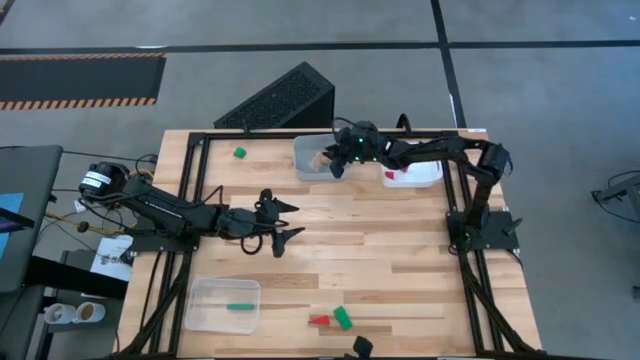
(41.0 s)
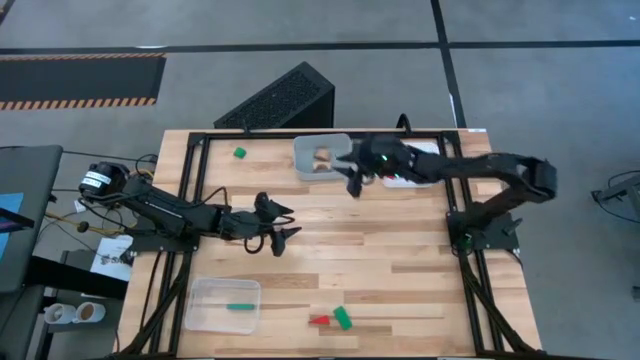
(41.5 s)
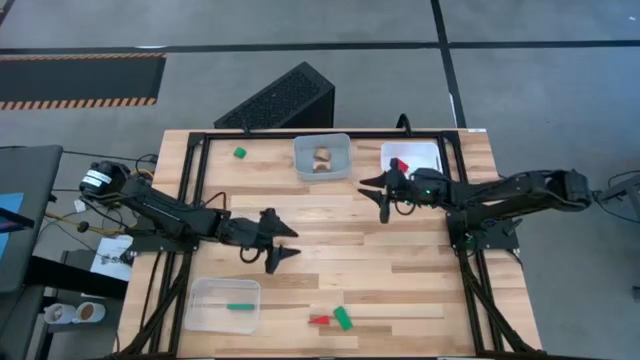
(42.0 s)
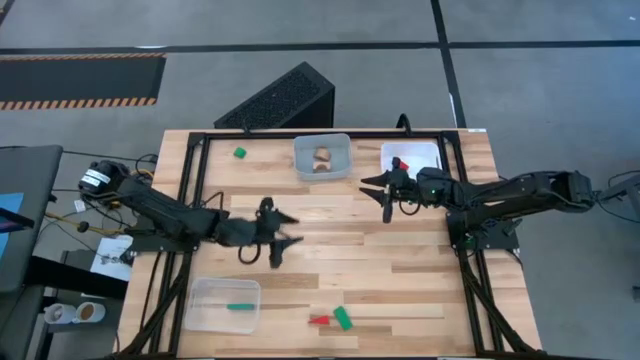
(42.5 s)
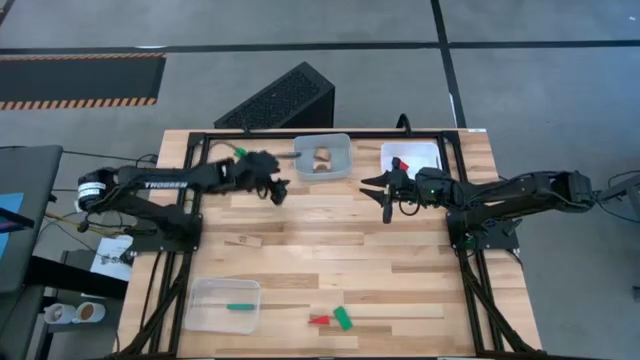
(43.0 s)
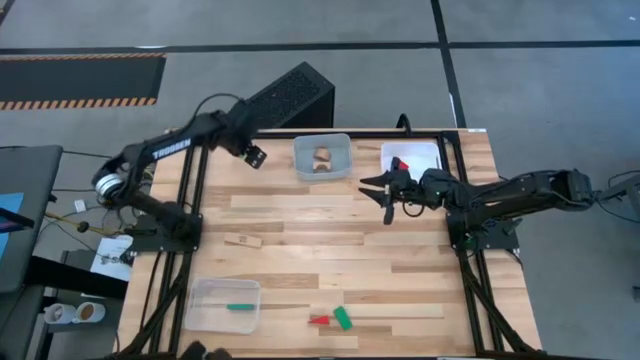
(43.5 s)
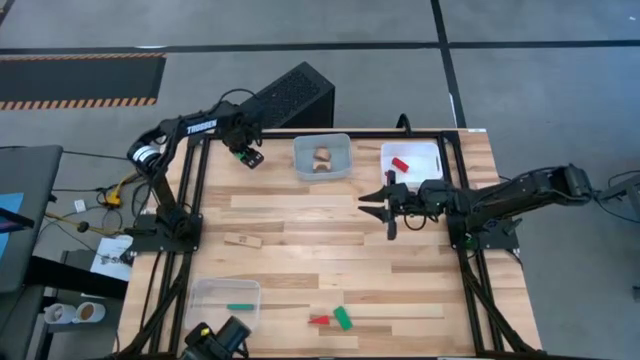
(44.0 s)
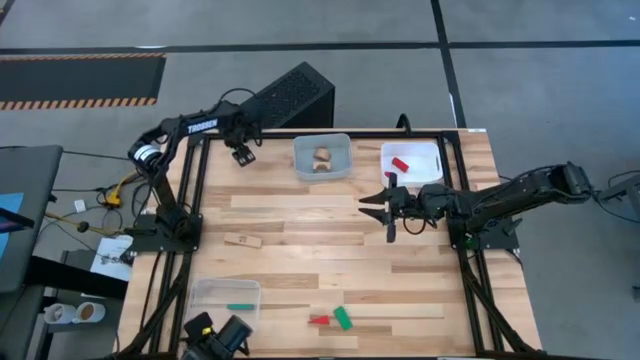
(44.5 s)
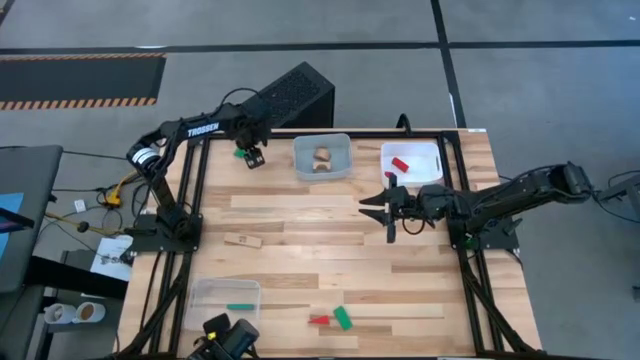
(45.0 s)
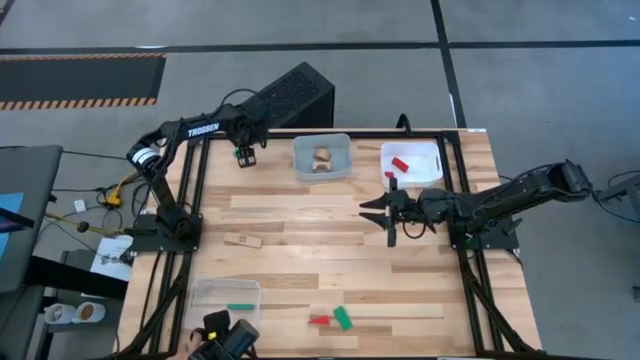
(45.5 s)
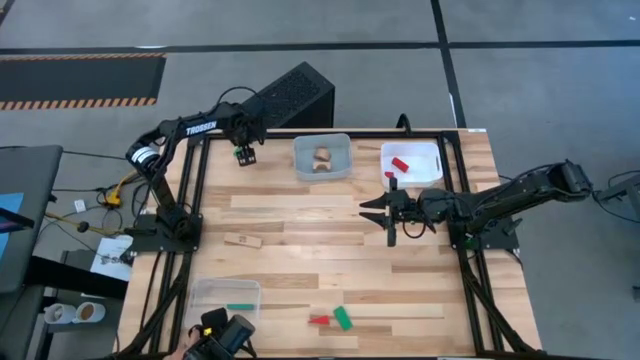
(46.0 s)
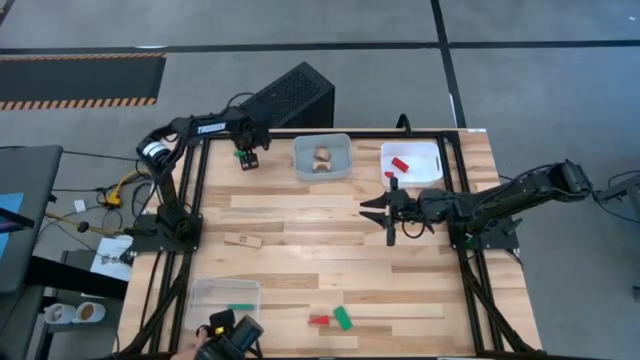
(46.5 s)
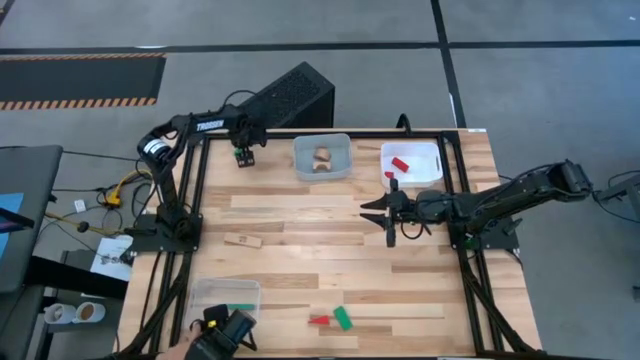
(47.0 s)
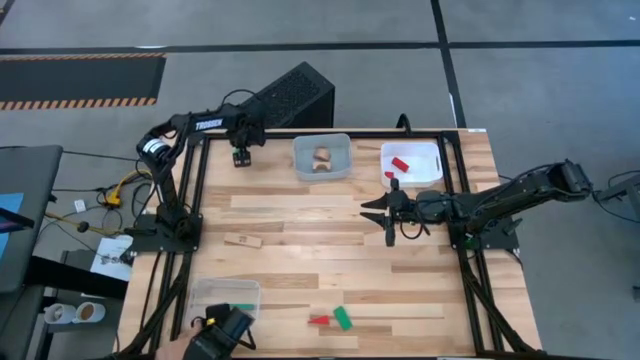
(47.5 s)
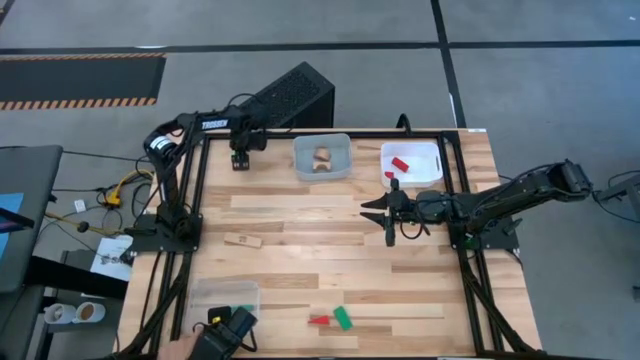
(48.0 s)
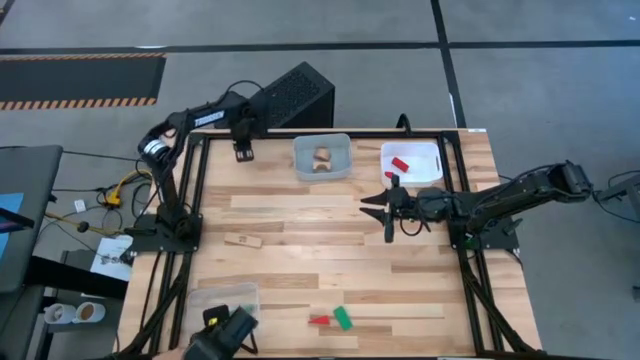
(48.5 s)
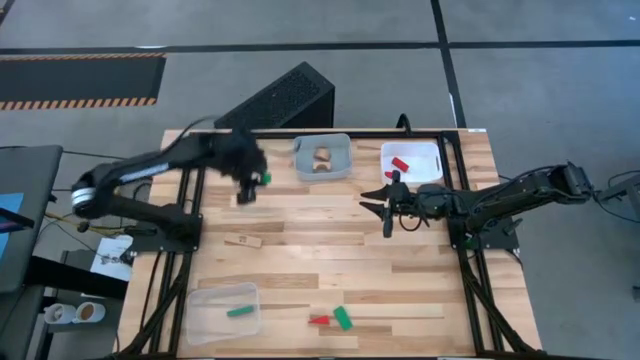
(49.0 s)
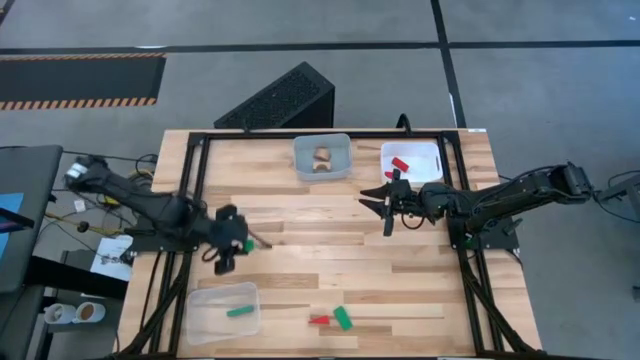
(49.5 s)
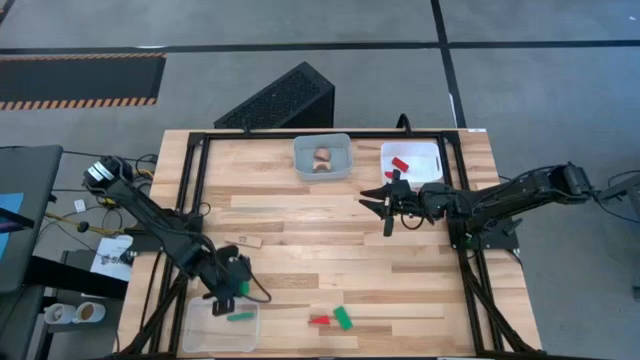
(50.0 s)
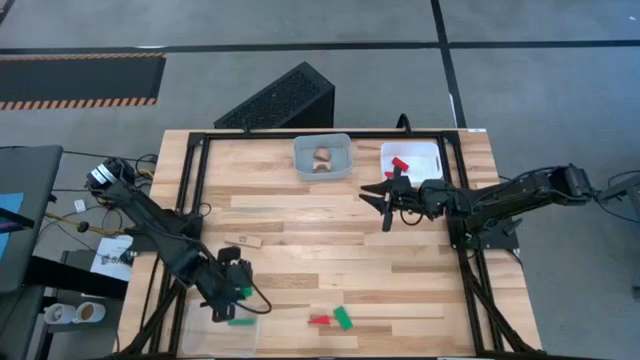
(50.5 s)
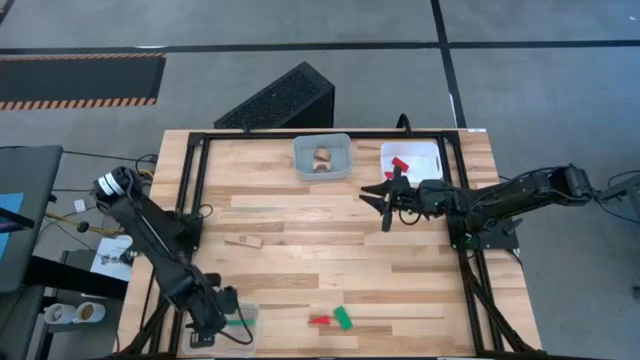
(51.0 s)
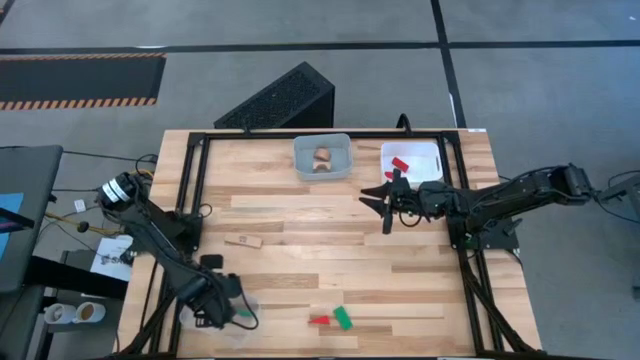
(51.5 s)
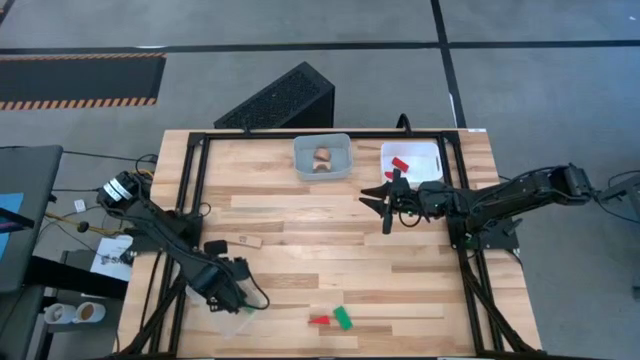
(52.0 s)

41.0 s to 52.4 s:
Task: Sort & place blocks by color
Put the top green block into the transparent bin

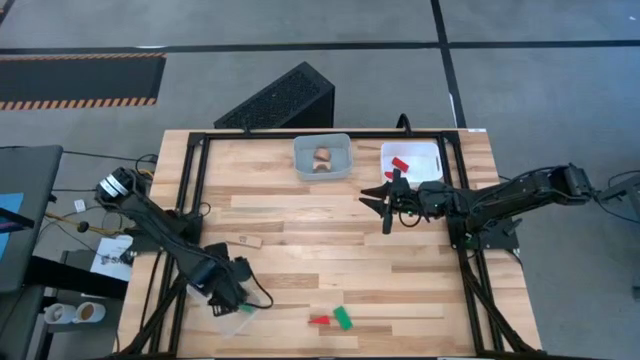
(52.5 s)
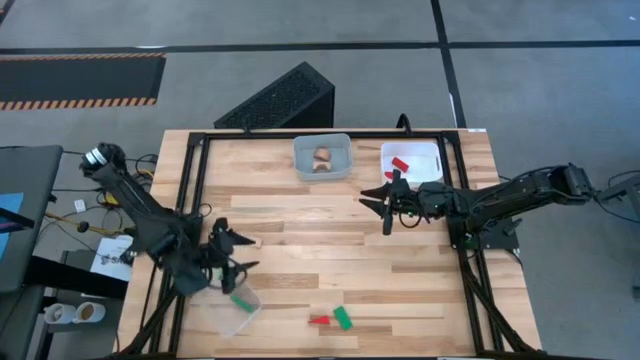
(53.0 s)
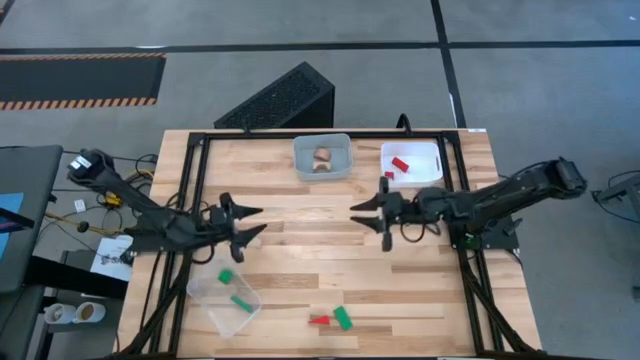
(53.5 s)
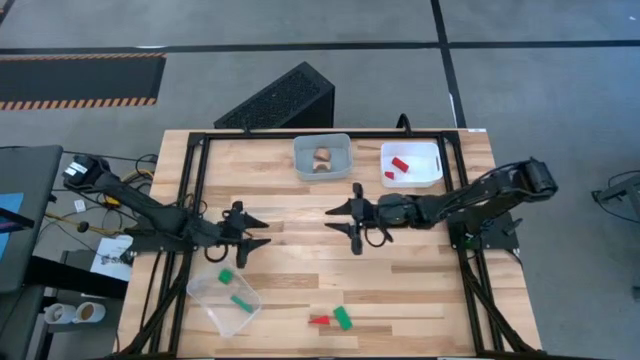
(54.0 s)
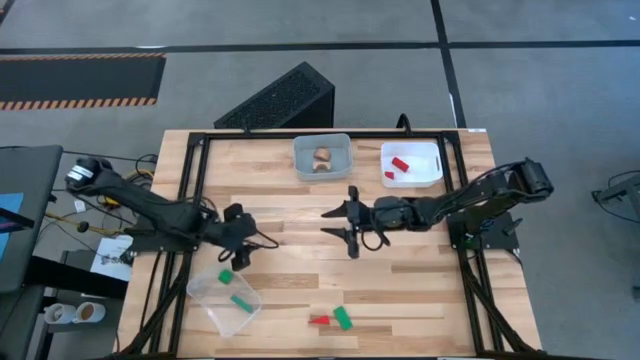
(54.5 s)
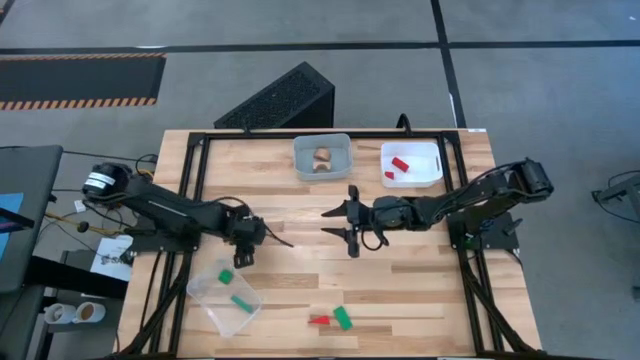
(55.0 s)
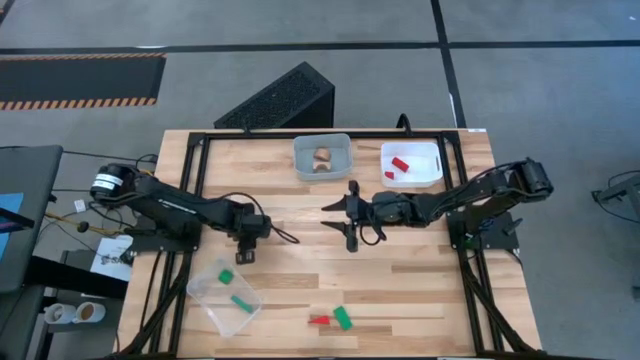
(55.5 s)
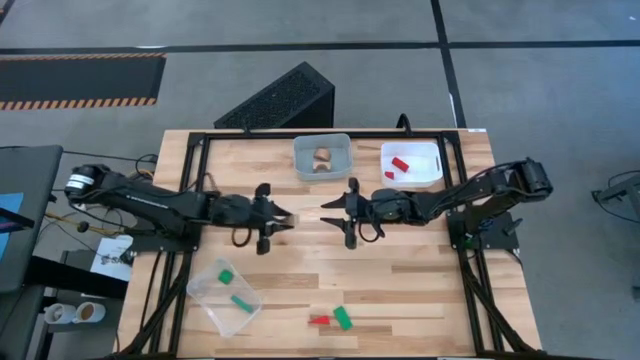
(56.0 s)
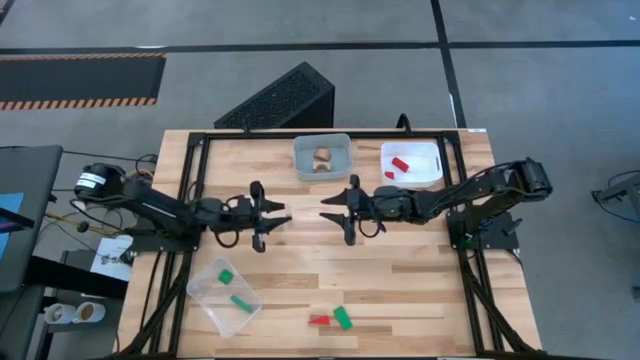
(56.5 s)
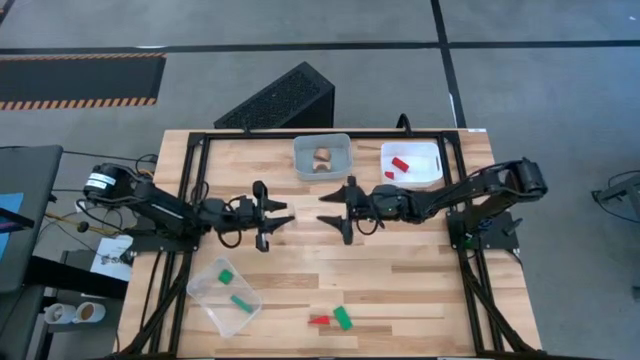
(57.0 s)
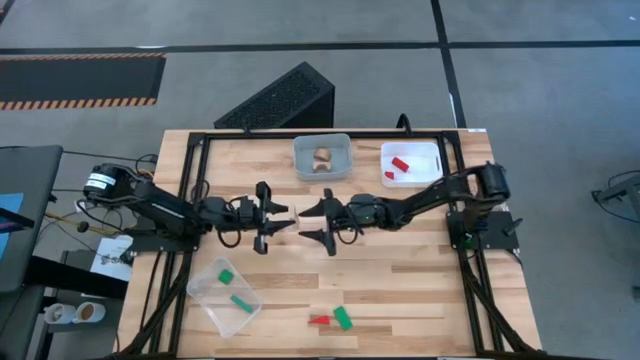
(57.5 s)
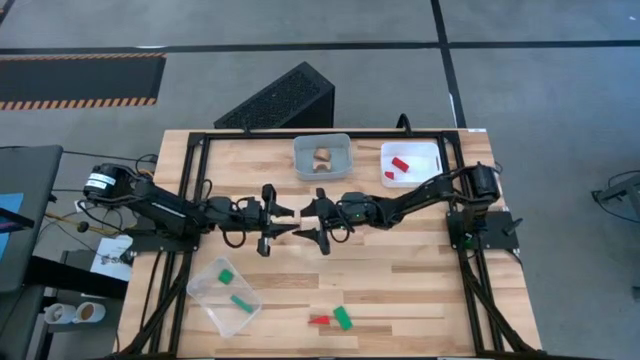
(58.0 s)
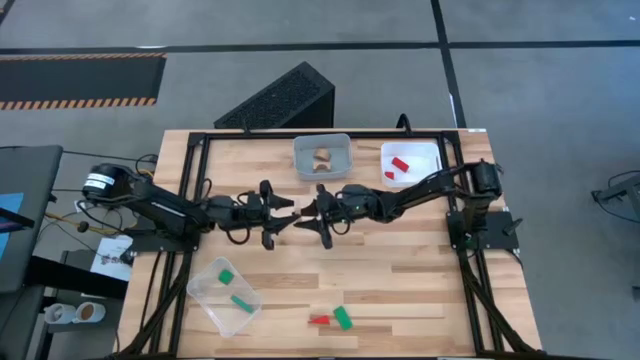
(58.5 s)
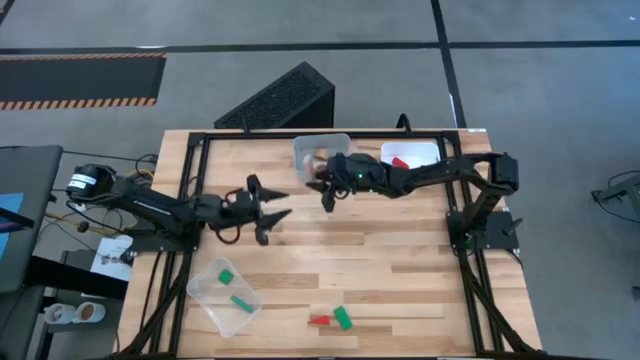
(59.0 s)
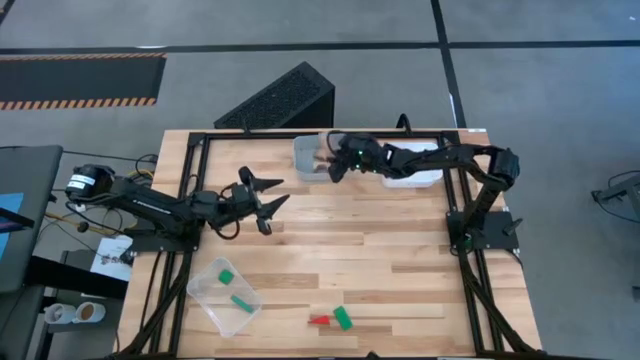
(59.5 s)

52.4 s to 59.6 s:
Put the brown block into the gray bin

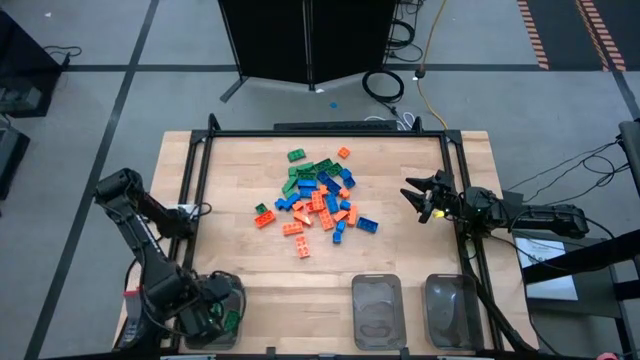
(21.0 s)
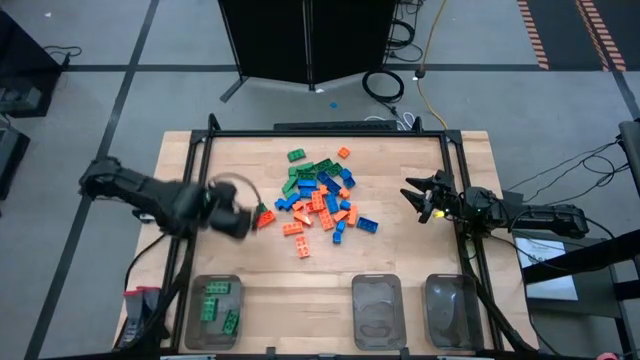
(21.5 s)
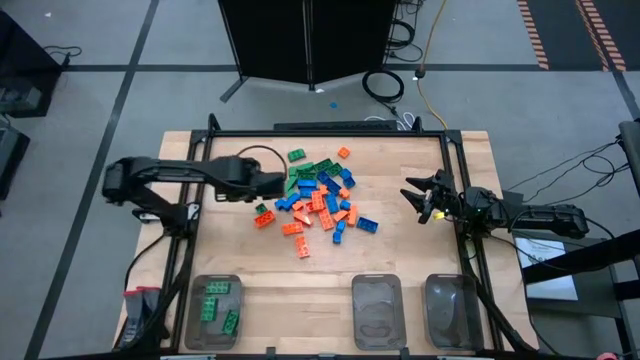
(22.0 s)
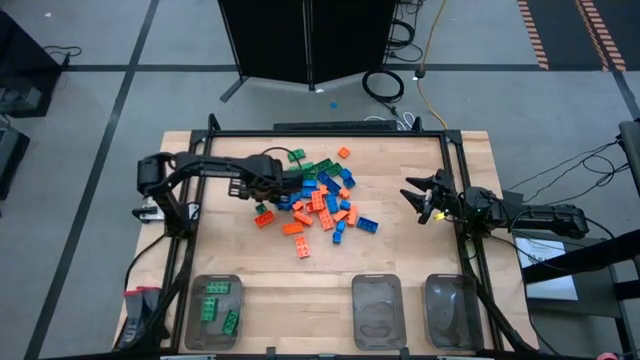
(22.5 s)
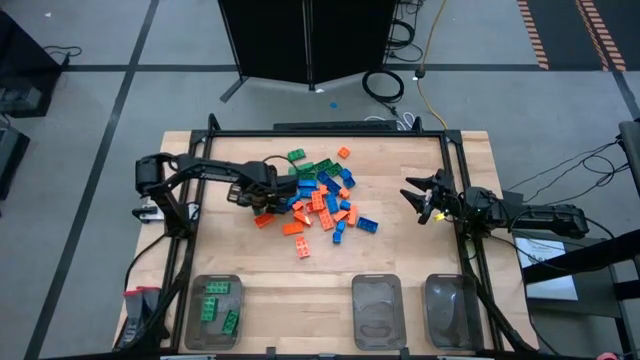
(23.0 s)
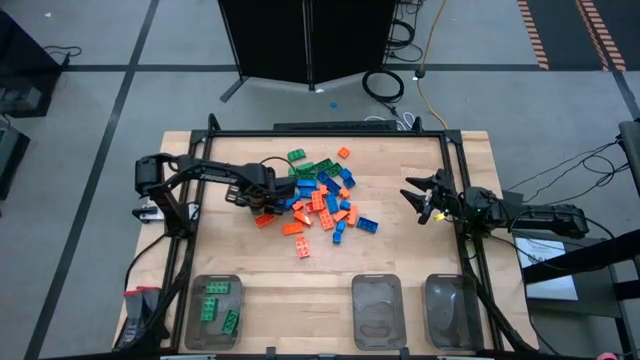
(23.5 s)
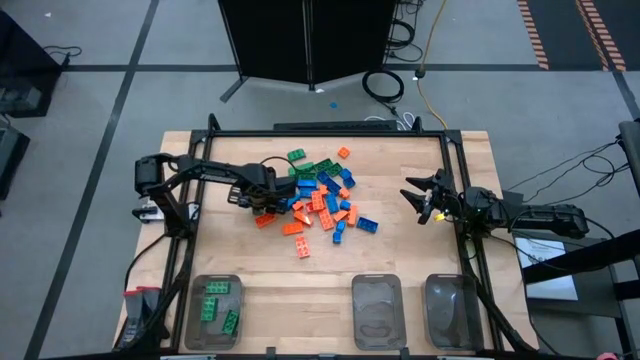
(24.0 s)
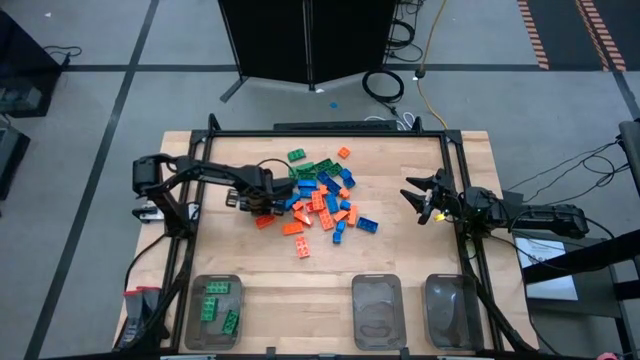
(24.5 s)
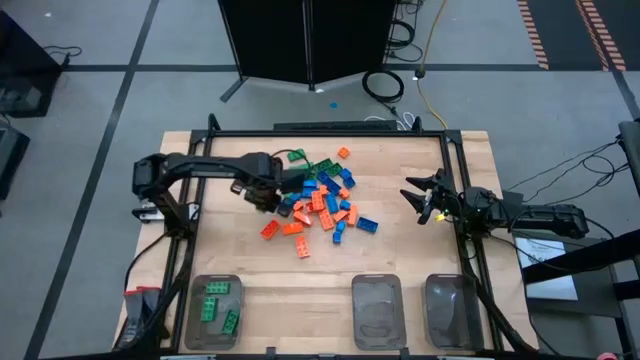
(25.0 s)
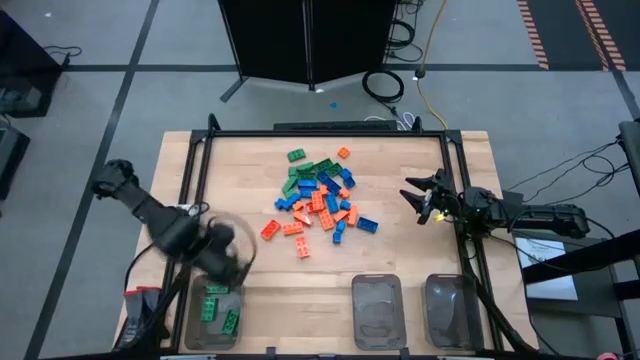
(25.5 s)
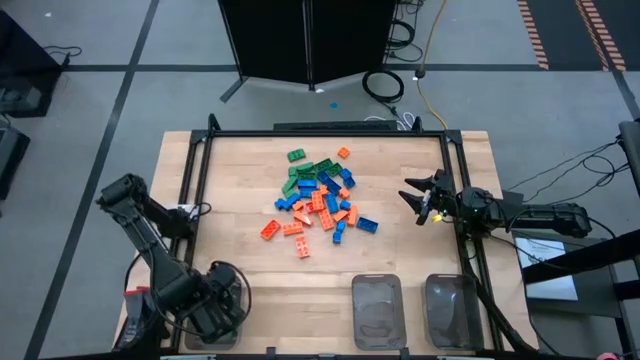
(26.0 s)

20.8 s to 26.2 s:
Task: Sort blocks
Put the green game piece into the left black bin
